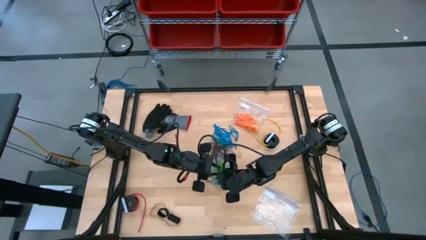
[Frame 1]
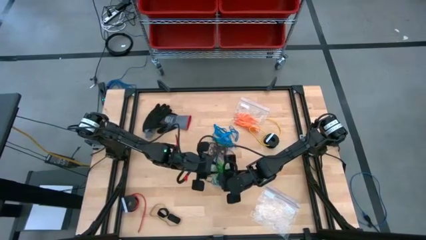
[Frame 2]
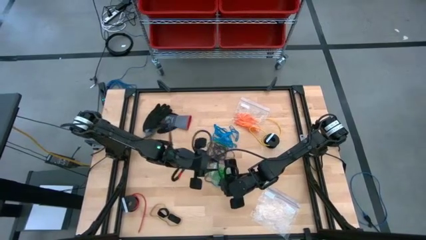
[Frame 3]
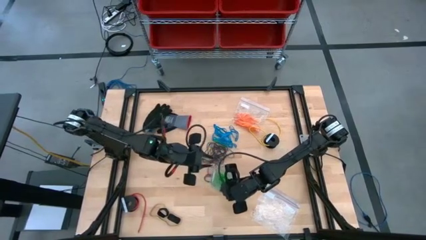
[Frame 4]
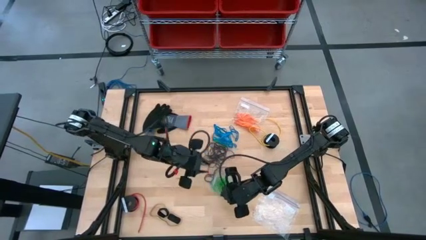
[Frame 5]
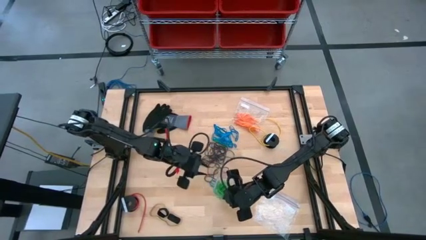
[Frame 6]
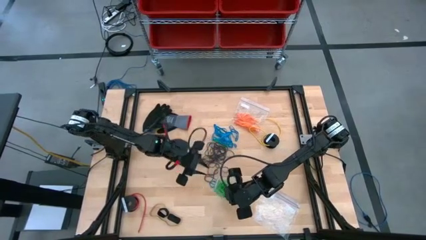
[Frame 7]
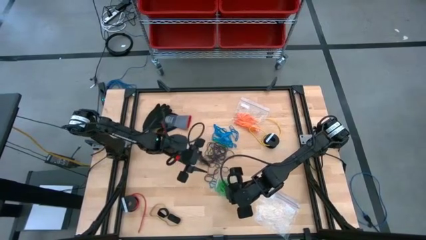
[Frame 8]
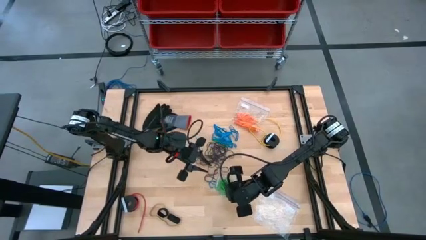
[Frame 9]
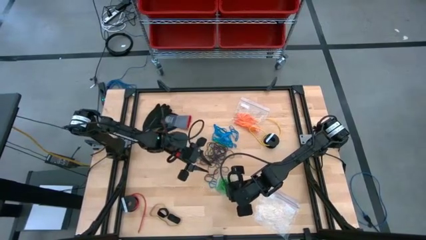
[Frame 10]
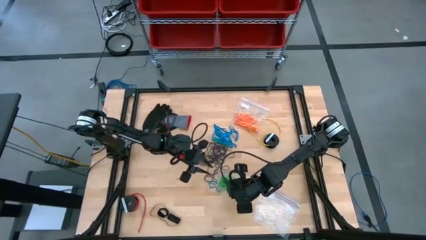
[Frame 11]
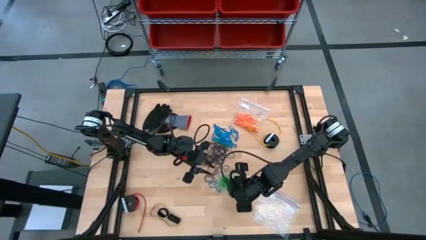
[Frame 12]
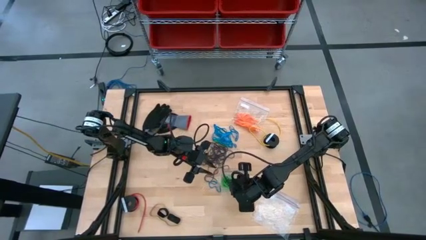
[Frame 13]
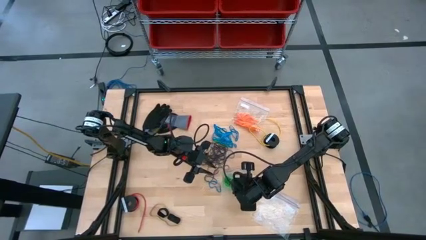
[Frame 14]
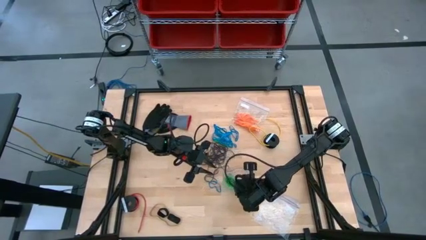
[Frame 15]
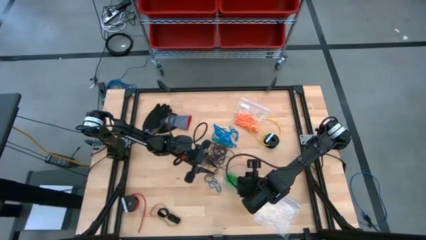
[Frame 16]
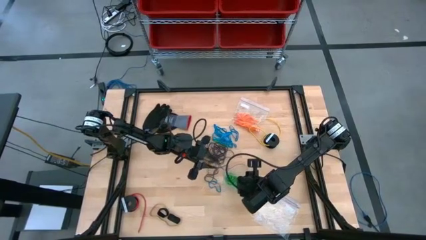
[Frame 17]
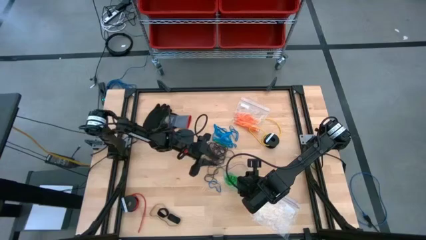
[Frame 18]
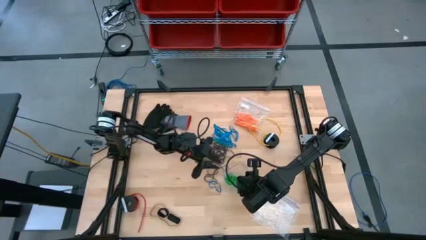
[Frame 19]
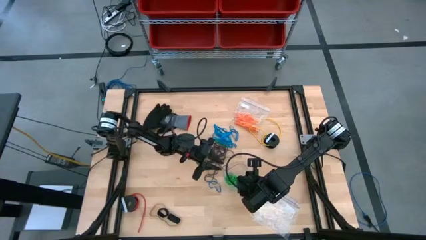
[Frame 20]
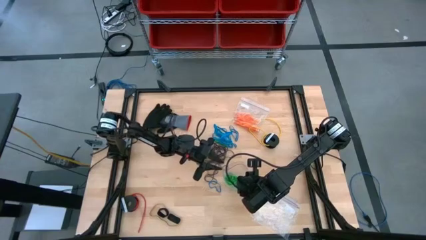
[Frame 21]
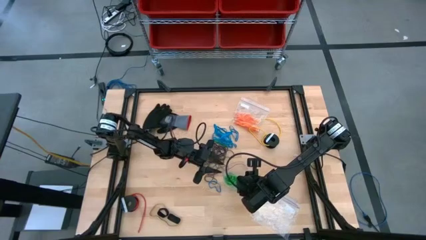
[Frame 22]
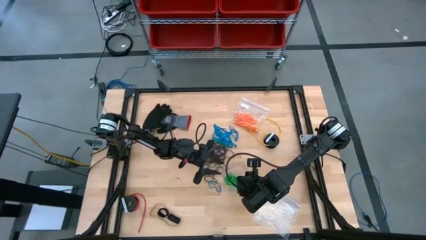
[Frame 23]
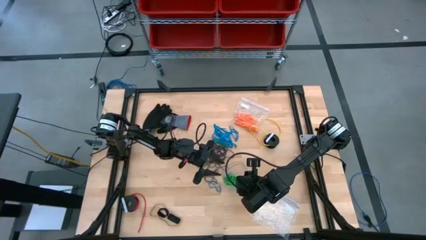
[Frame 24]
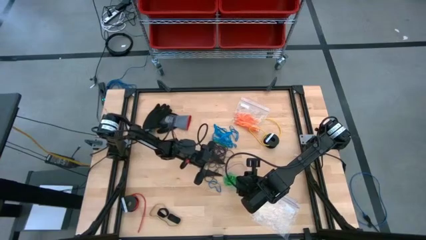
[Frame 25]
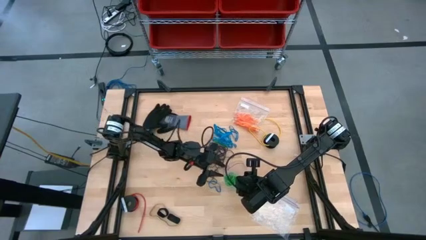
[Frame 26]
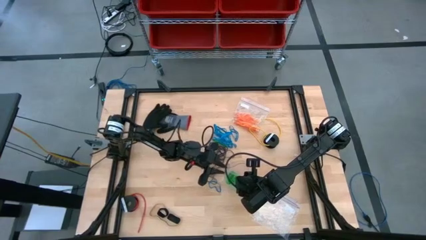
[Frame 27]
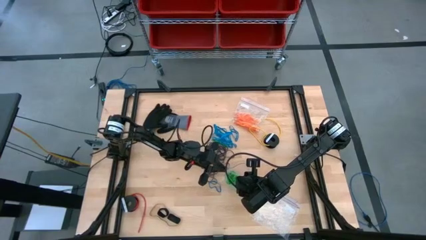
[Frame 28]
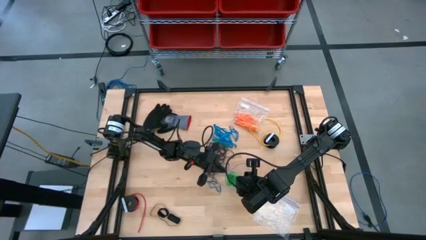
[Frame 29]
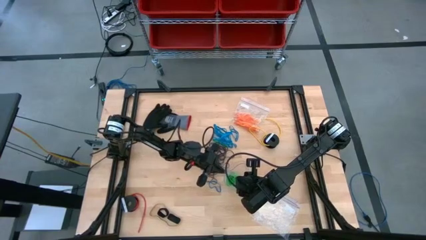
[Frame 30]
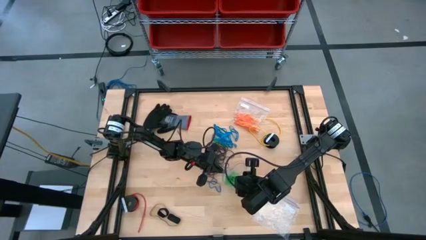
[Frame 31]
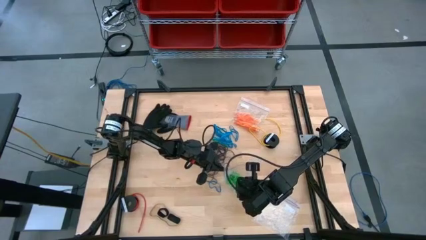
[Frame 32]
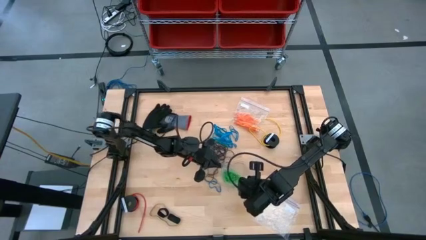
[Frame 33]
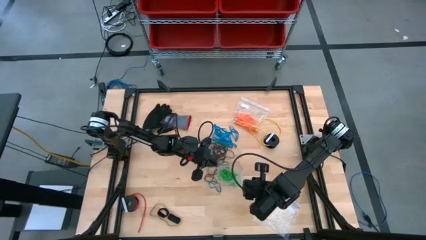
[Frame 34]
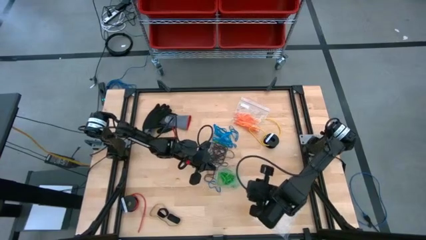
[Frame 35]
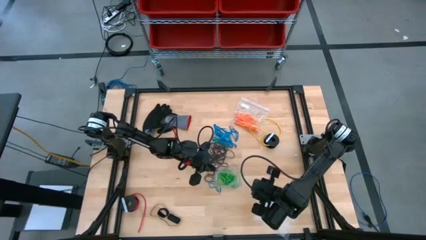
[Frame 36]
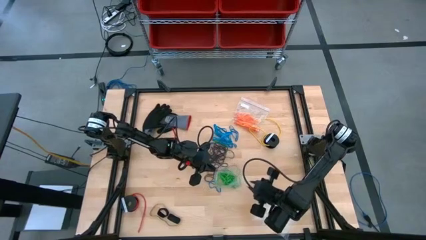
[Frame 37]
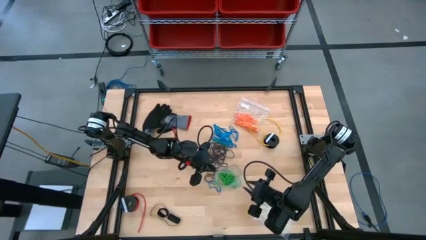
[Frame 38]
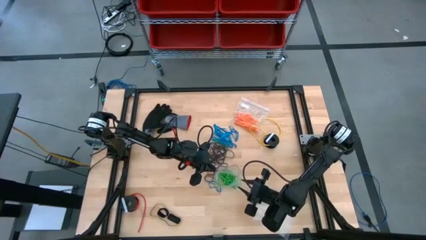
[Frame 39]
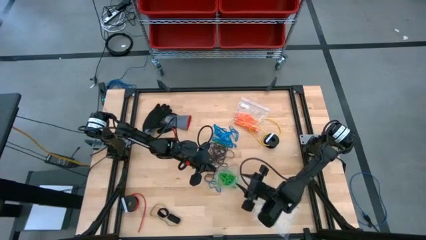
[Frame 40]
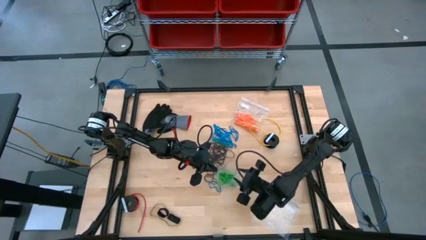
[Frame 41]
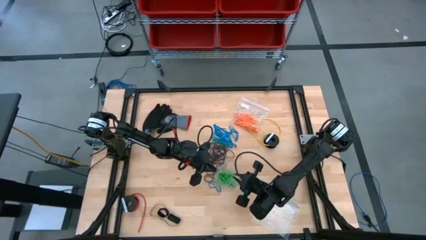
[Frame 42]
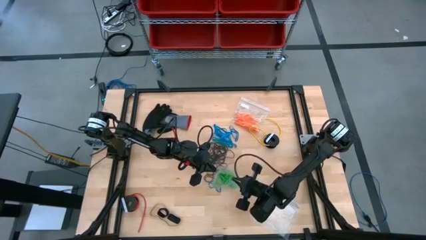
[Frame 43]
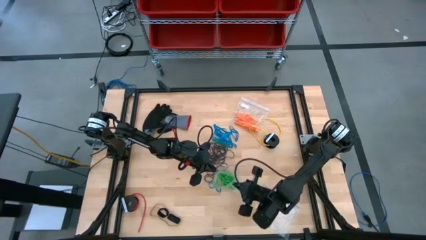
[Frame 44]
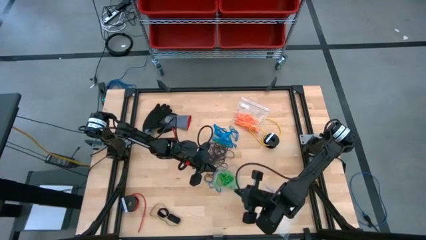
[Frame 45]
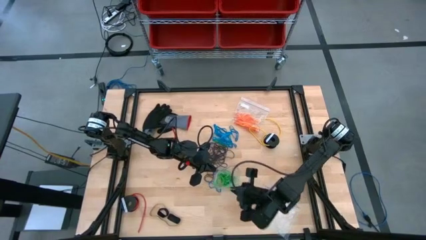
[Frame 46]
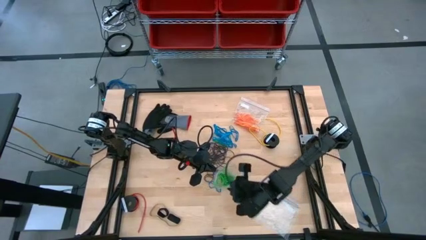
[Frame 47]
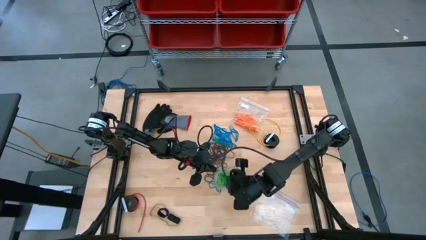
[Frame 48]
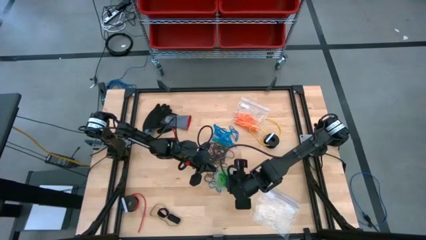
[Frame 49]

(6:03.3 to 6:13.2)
Task: Sort rubber bands
Close the transparent zip bag

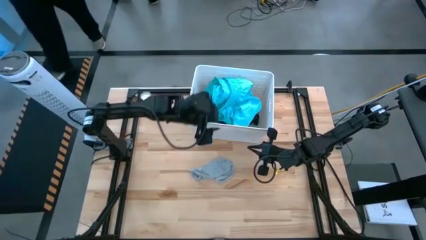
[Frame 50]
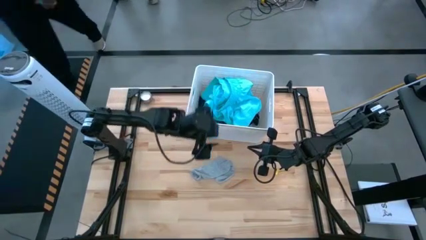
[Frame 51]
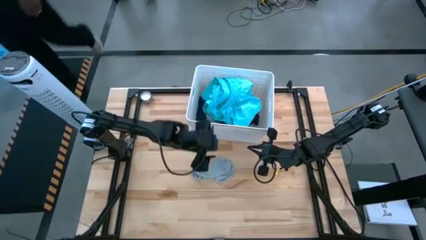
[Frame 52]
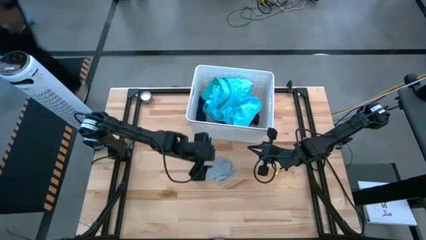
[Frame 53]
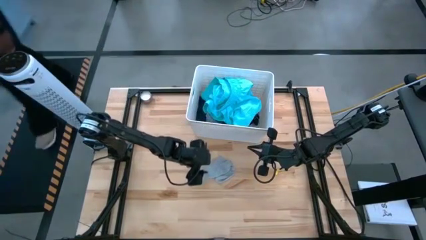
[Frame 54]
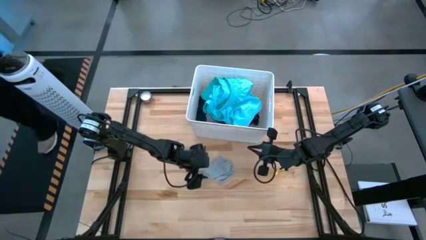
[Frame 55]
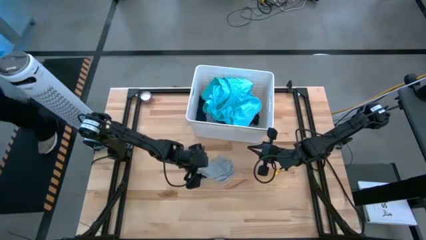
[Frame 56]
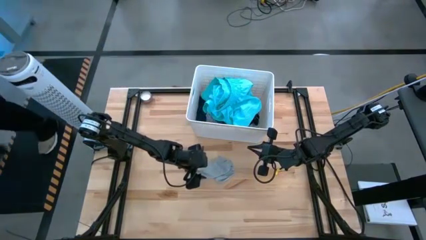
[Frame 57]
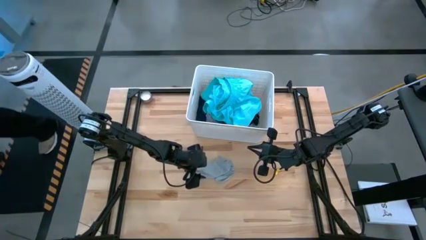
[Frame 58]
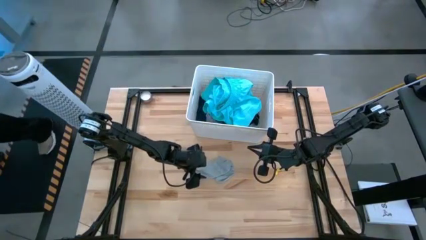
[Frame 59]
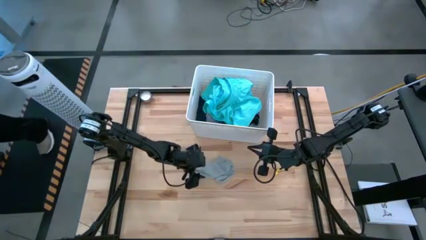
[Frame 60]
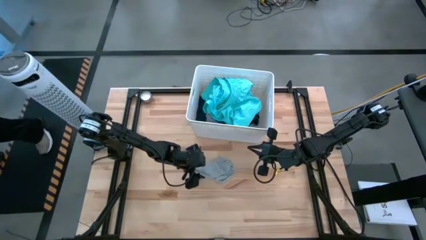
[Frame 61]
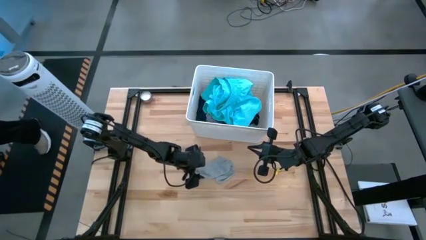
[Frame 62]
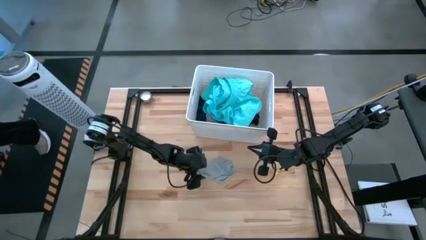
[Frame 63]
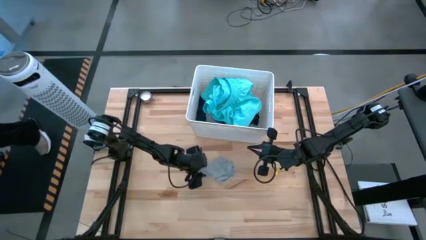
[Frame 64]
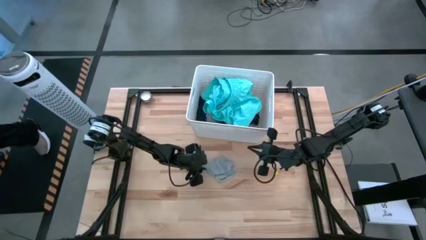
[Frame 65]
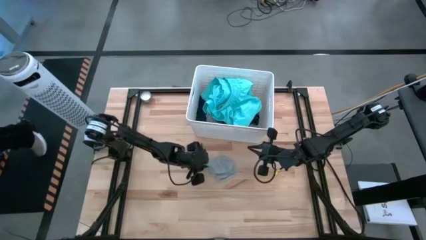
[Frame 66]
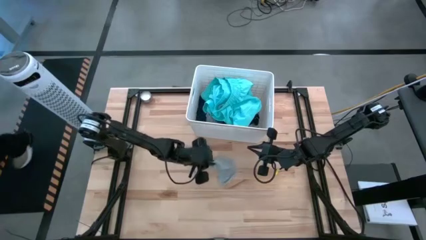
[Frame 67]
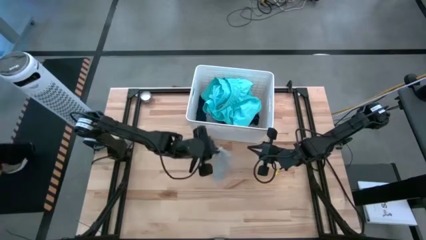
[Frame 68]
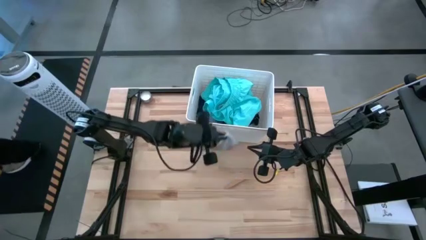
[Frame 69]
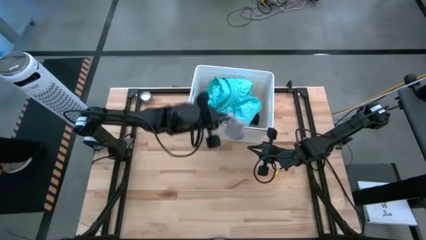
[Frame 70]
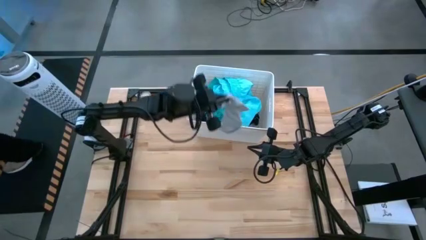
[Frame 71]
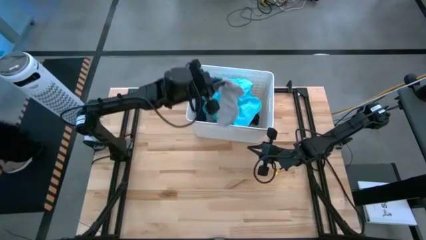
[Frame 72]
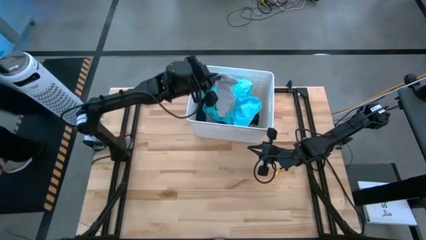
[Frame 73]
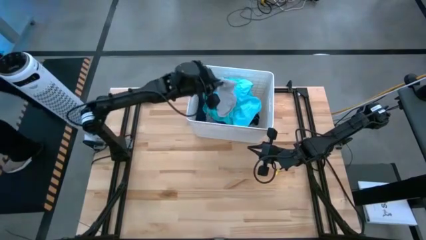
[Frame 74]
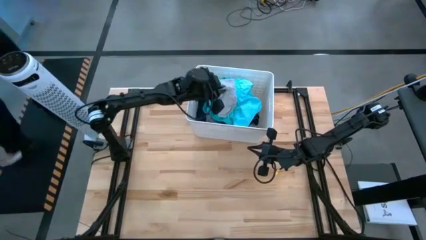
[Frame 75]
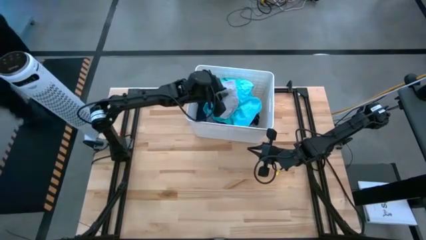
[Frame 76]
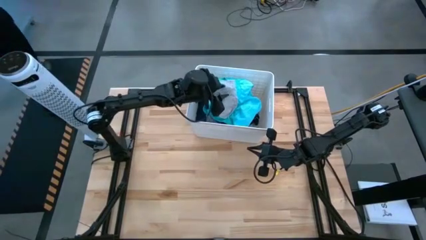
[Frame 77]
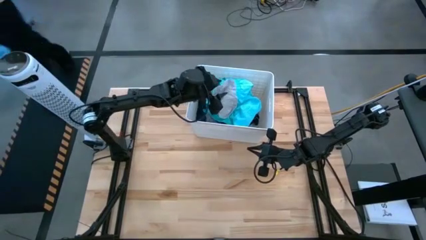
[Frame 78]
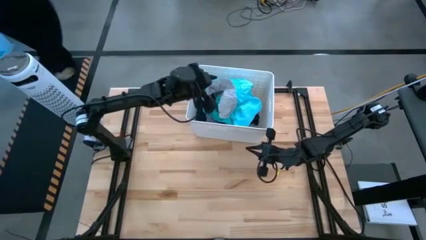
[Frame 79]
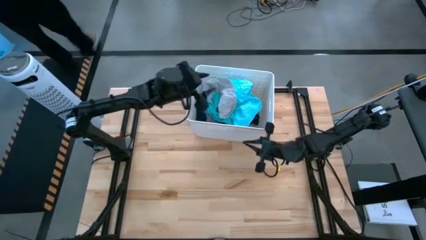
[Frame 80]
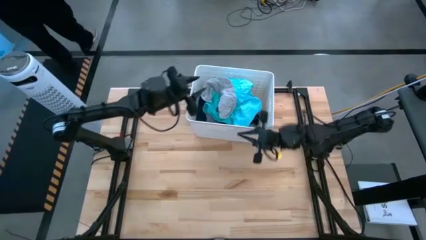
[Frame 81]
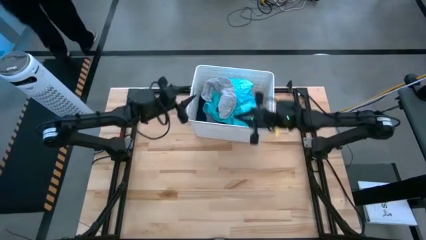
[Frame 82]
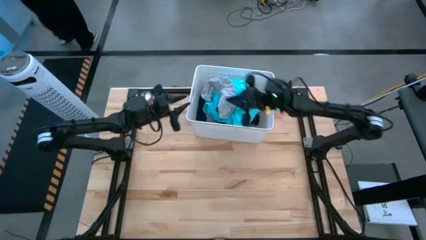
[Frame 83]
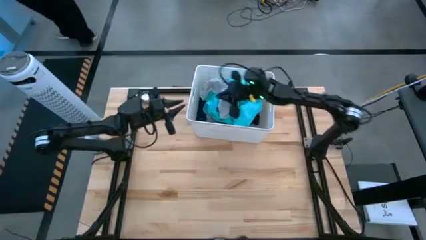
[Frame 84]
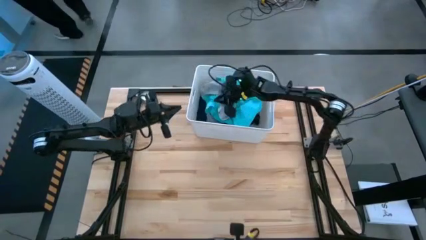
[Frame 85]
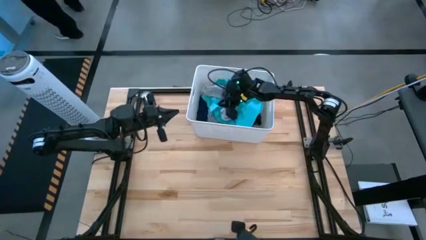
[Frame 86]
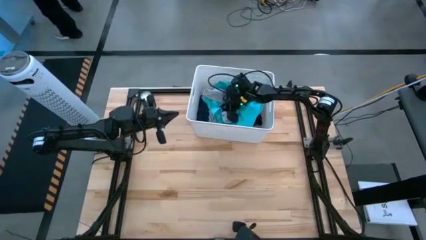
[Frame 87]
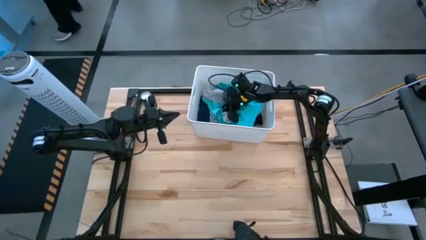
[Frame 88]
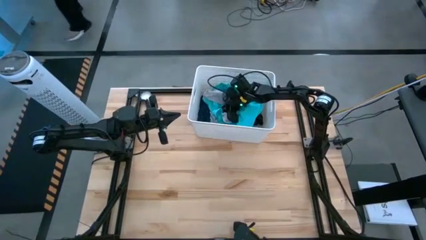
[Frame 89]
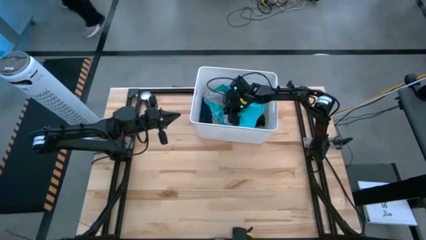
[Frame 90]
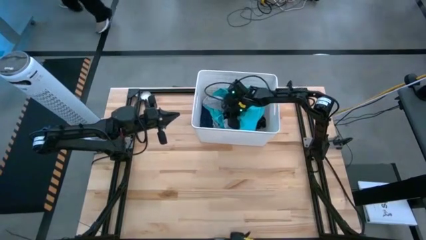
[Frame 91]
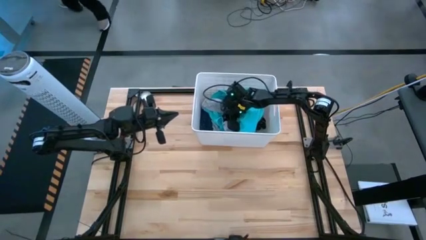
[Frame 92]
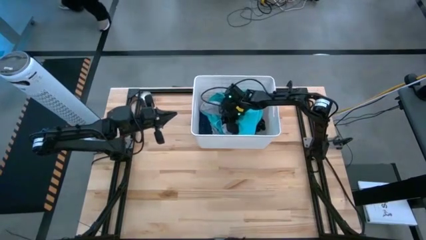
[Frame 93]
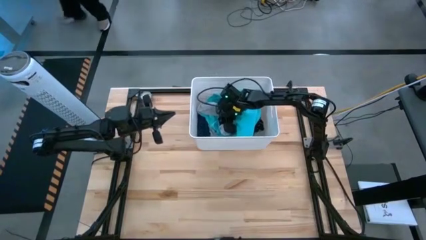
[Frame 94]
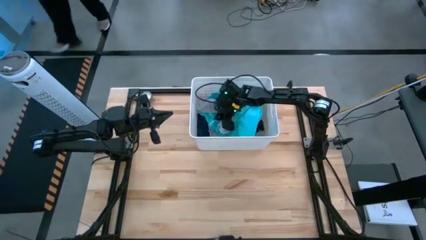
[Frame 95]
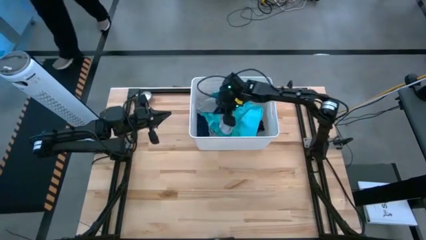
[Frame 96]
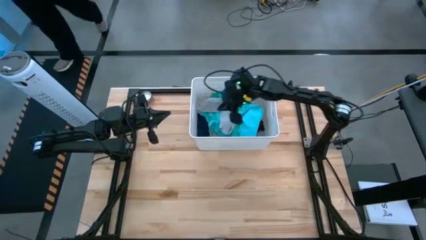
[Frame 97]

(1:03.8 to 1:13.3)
Task: Sort clothes
Put the gray sock into the laundry bin
